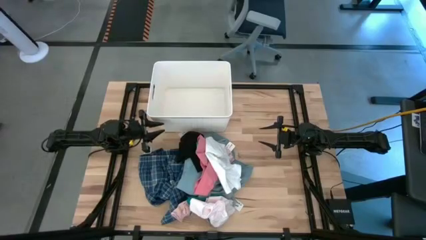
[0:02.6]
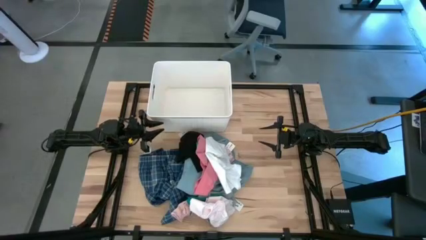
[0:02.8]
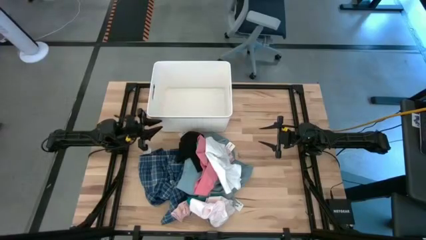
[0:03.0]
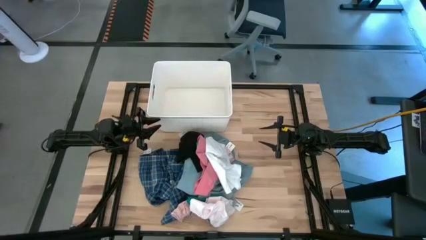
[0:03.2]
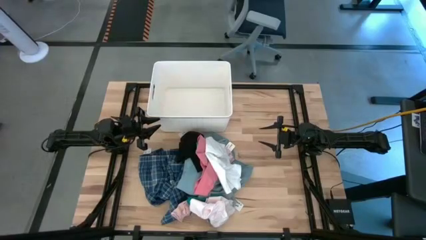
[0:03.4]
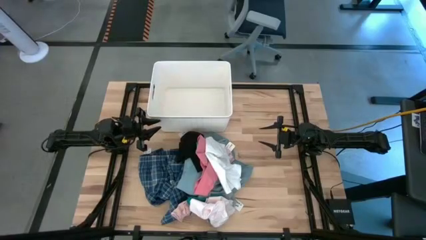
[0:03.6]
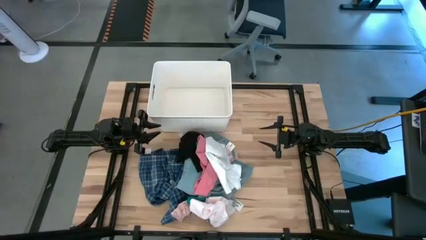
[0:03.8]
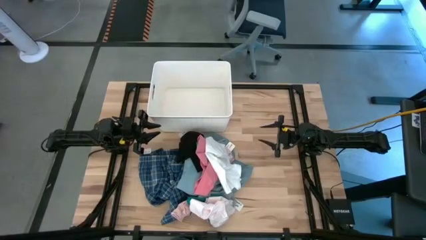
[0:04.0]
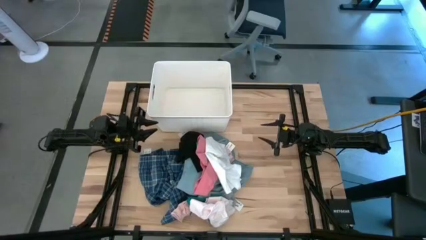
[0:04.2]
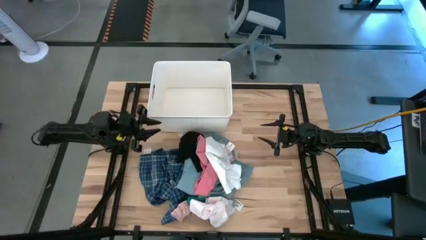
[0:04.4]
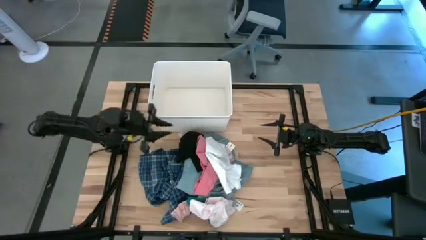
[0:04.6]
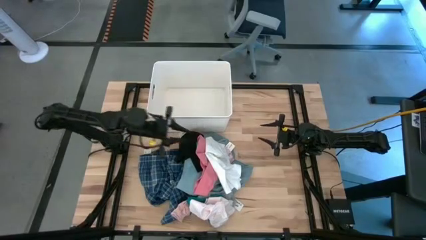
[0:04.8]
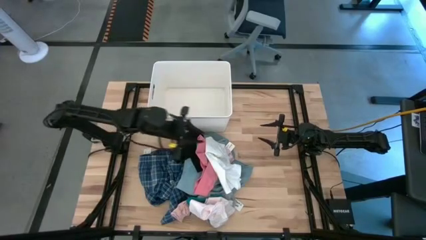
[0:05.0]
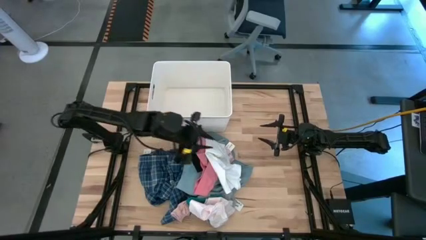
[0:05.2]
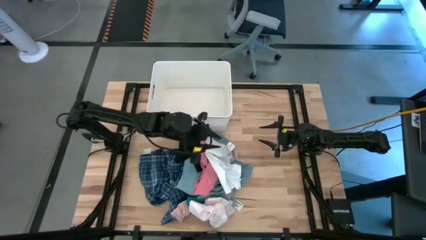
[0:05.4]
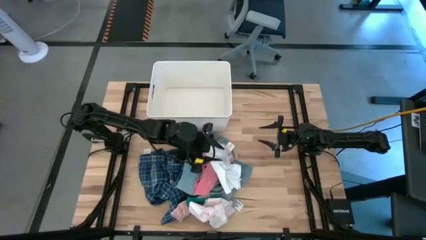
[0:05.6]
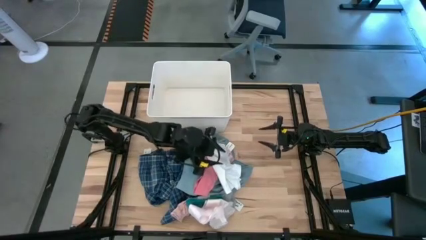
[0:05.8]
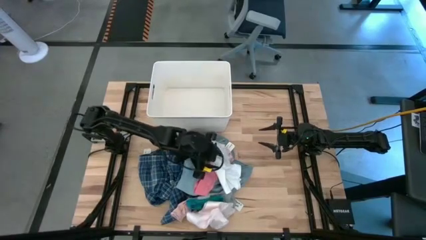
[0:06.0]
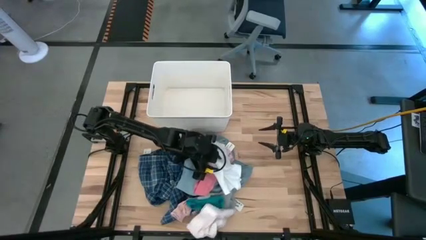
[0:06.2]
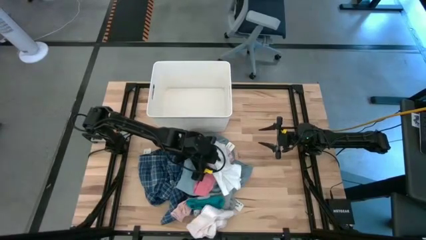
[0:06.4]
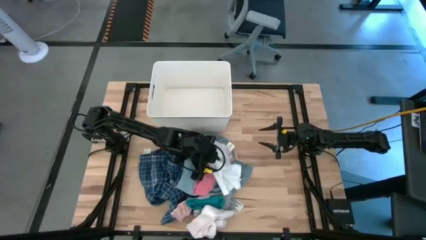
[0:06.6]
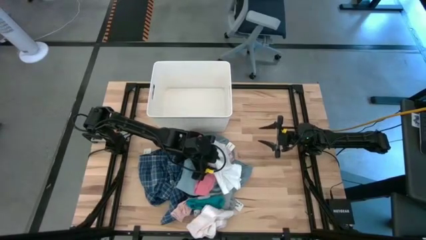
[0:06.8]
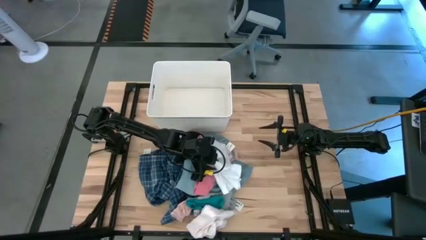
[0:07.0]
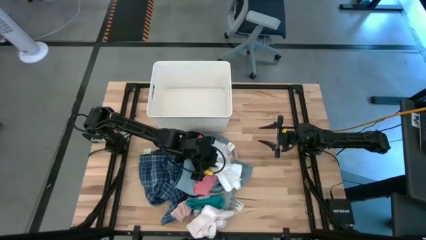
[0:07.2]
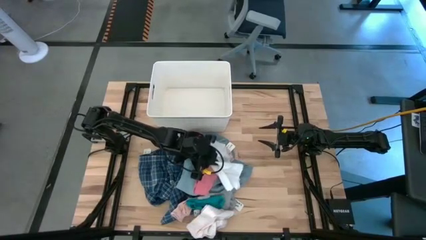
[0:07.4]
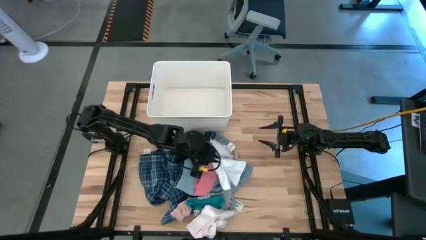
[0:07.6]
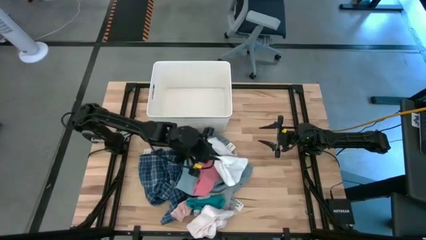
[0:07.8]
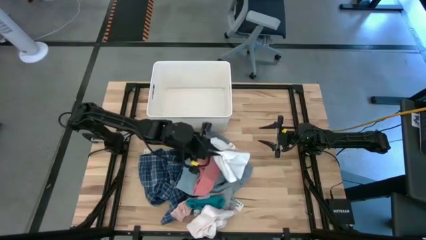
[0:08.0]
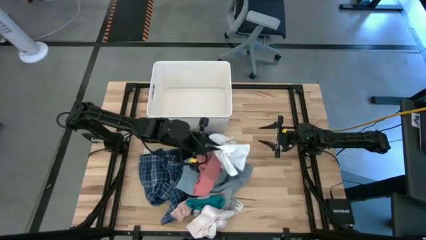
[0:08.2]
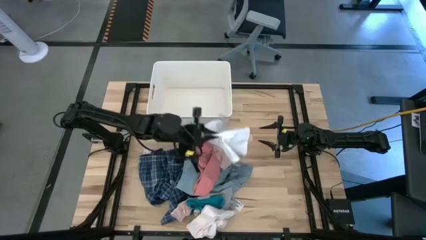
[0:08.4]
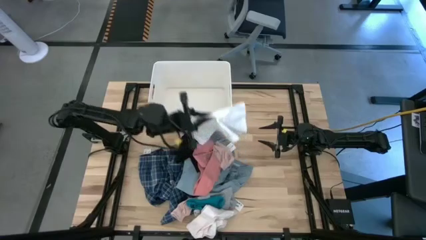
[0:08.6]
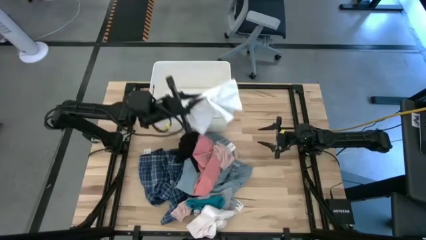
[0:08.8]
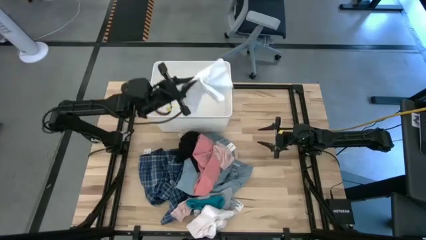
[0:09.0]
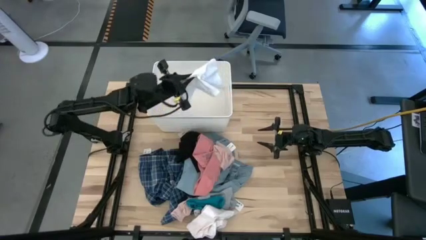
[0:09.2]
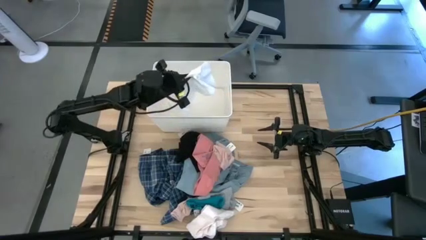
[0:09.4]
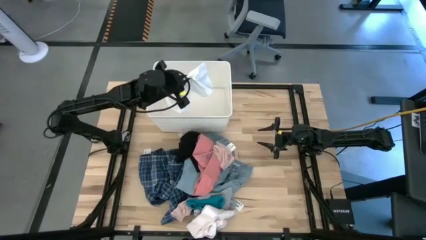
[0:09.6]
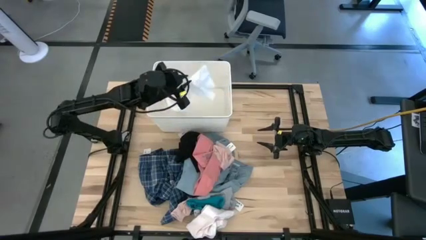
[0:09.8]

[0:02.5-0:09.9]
Task: Sort clothes
Put the white underwear into the white bin

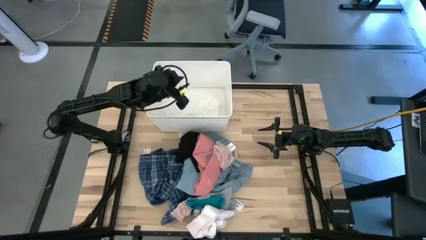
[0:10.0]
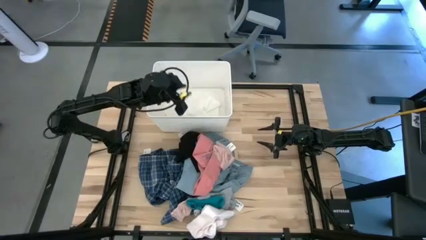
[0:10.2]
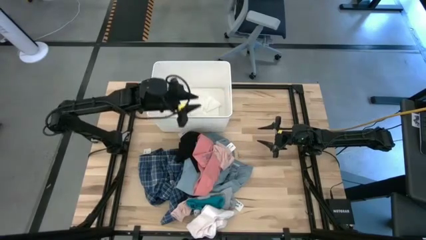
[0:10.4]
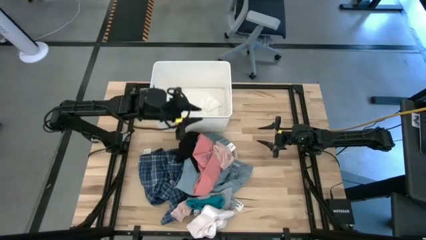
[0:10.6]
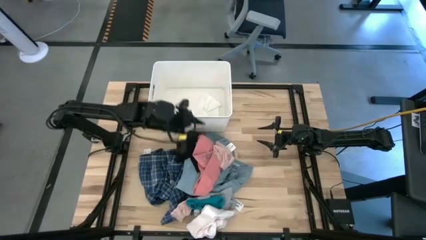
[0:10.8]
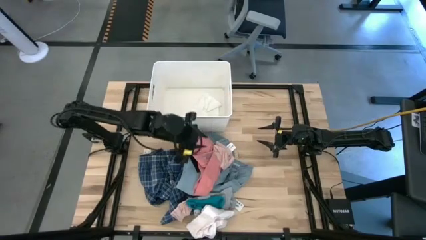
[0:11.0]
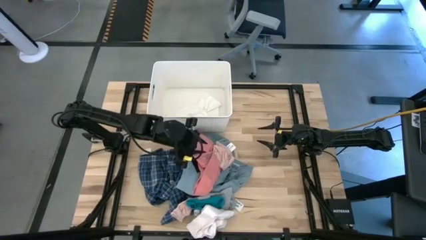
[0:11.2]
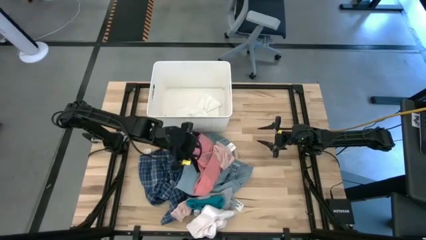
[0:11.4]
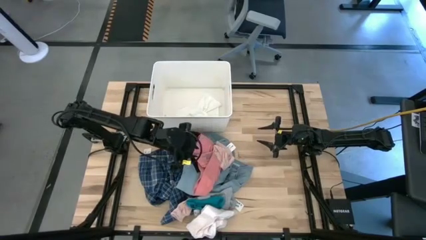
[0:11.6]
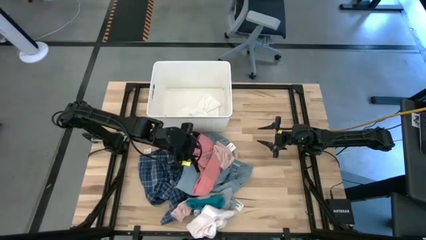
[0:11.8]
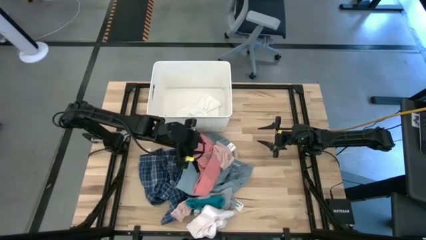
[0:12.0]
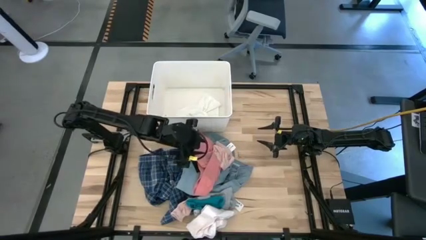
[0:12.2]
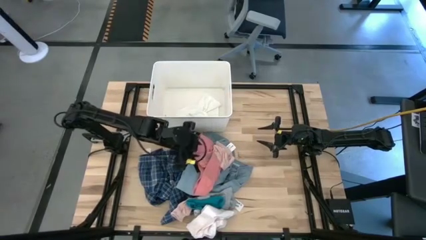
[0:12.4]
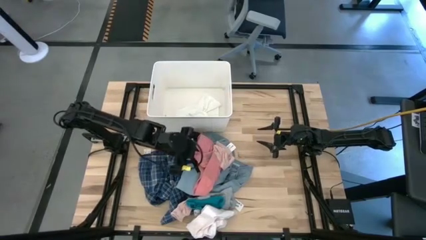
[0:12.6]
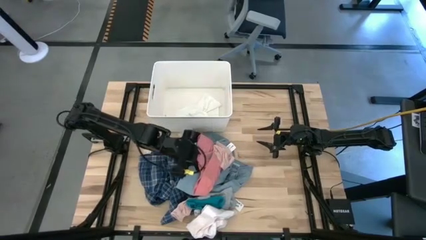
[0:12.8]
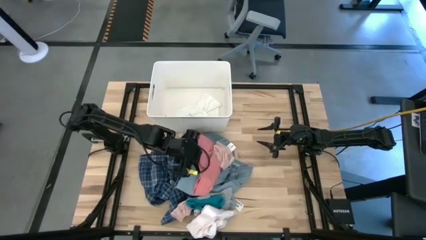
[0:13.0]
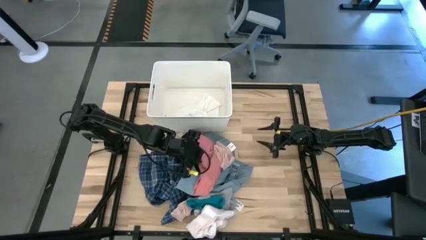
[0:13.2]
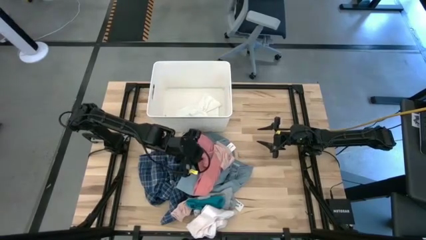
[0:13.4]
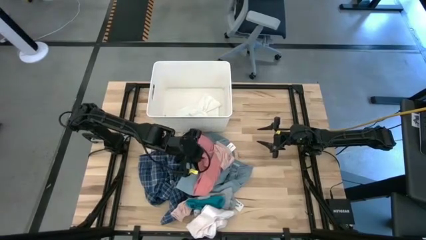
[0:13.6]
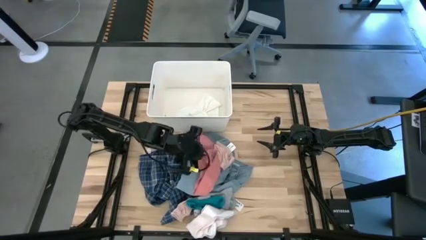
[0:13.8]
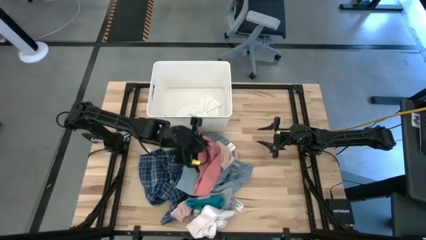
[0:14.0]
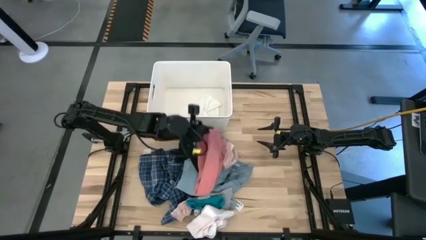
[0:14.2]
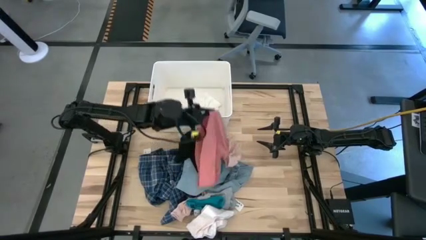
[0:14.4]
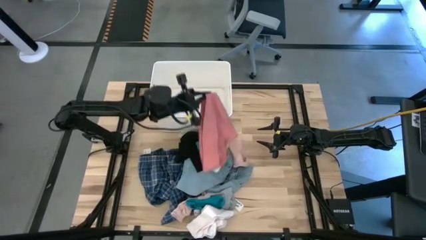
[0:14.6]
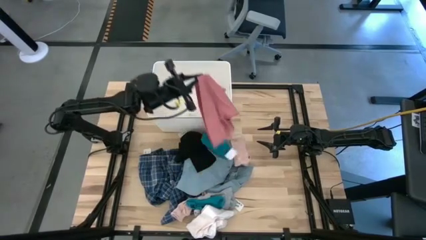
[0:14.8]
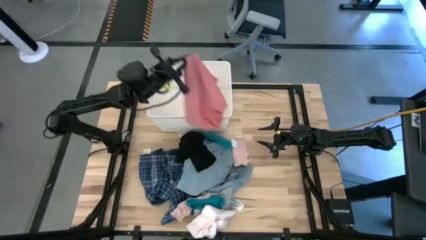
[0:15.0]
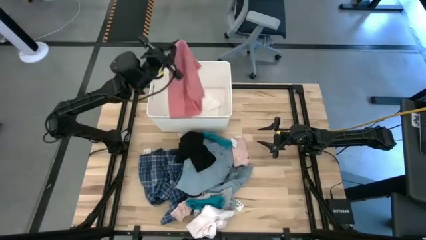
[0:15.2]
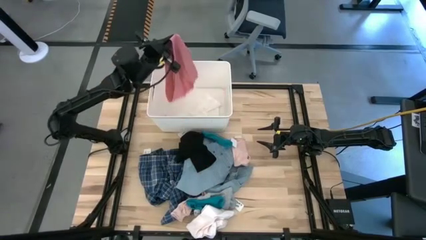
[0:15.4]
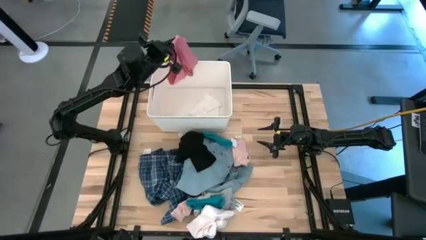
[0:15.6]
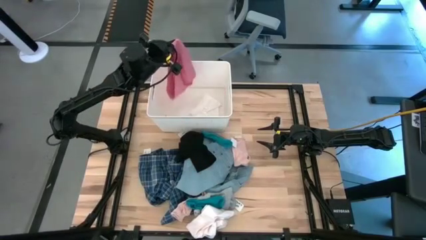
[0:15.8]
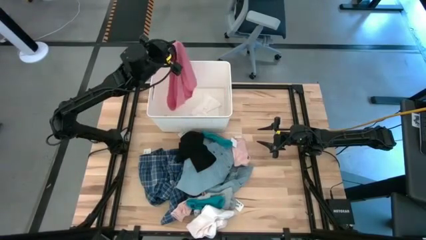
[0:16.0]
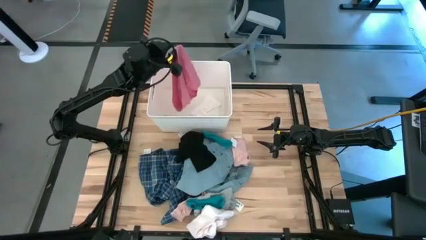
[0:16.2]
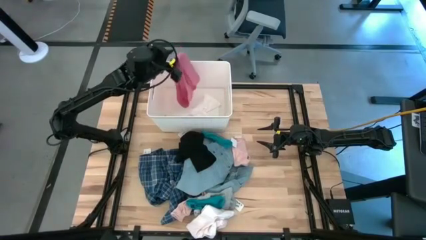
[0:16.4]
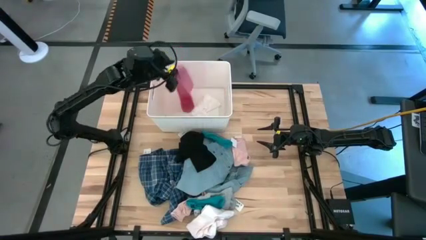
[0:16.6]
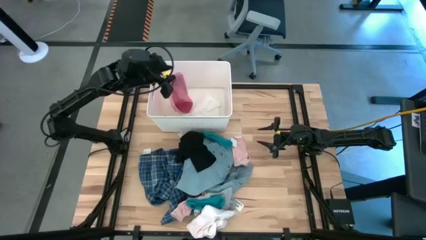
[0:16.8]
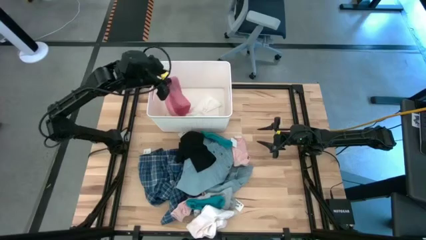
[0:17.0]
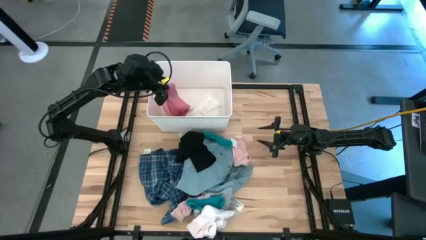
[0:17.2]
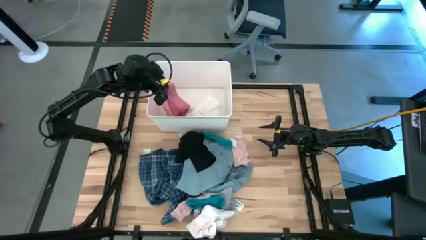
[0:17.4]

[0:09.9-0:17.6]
Put the pink underwear into the white bin
